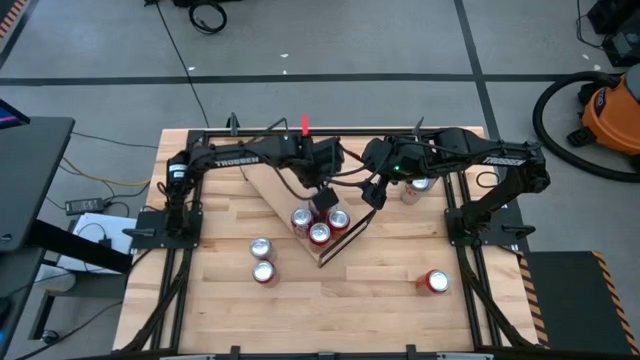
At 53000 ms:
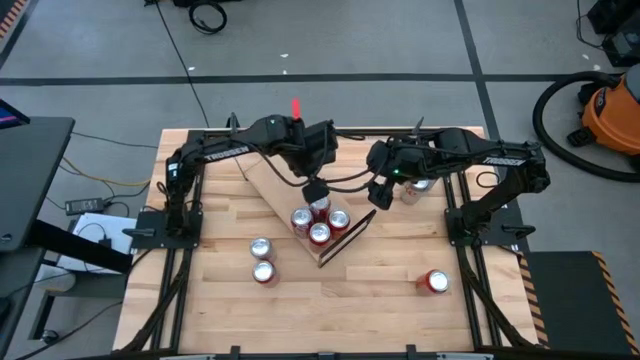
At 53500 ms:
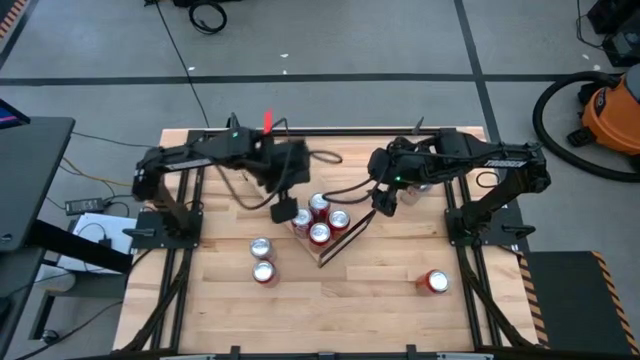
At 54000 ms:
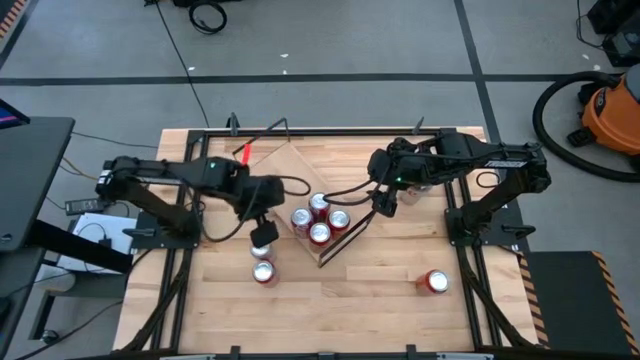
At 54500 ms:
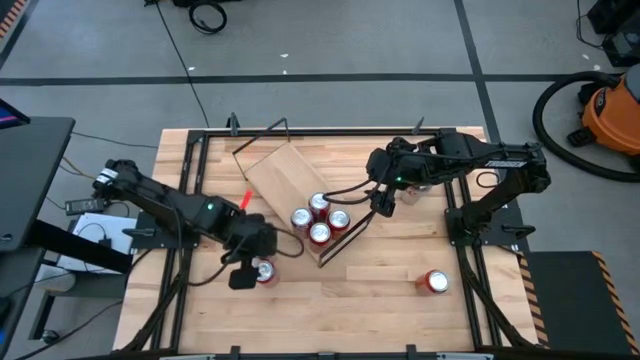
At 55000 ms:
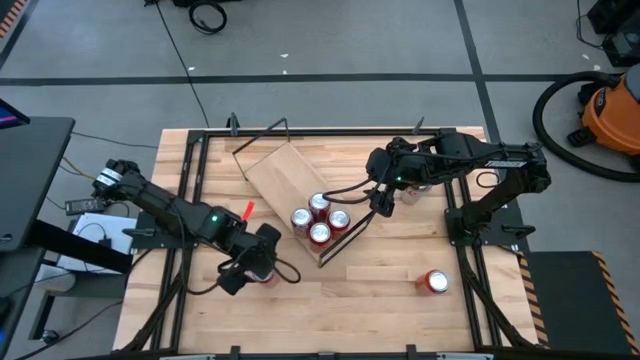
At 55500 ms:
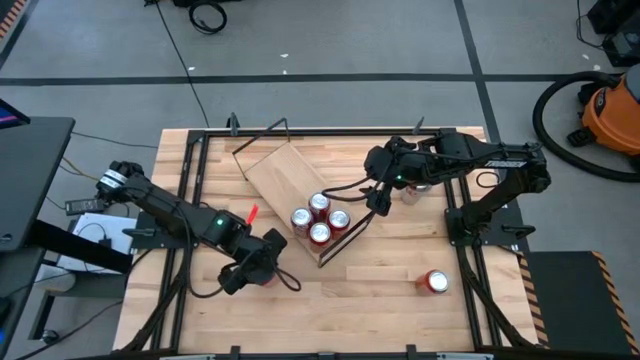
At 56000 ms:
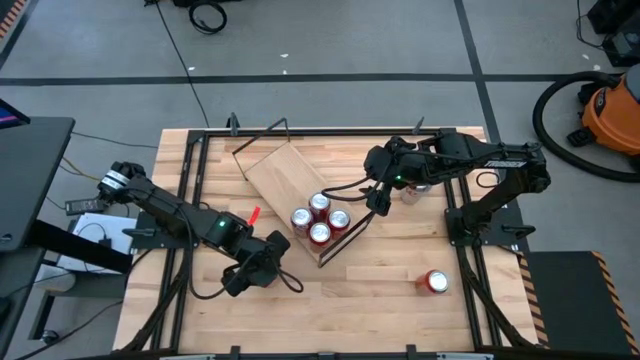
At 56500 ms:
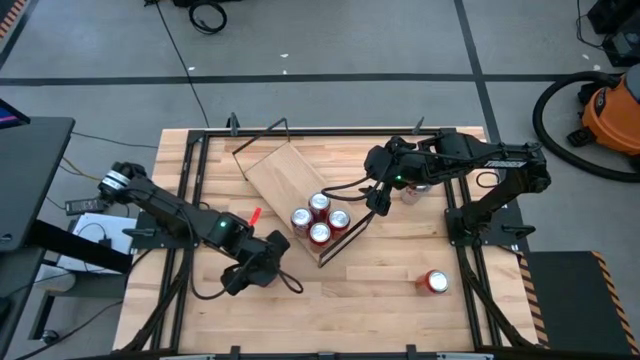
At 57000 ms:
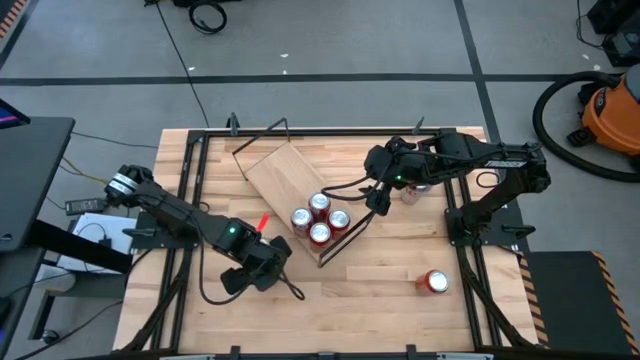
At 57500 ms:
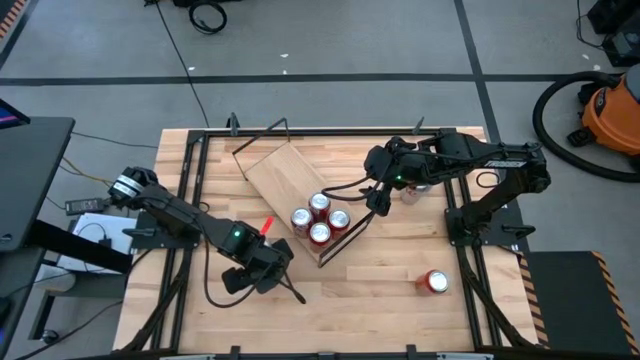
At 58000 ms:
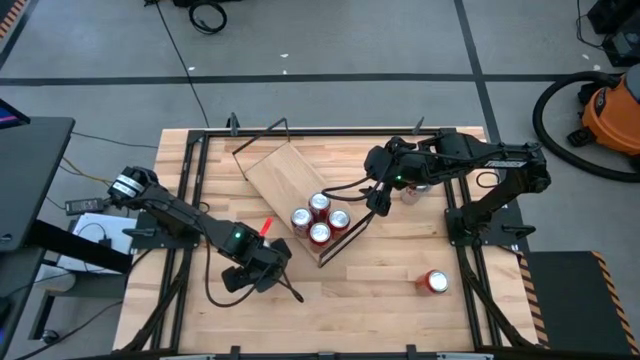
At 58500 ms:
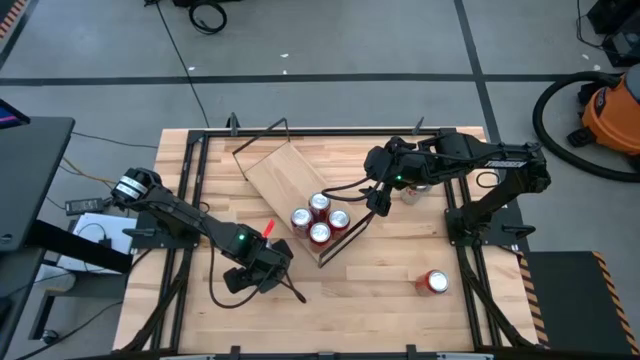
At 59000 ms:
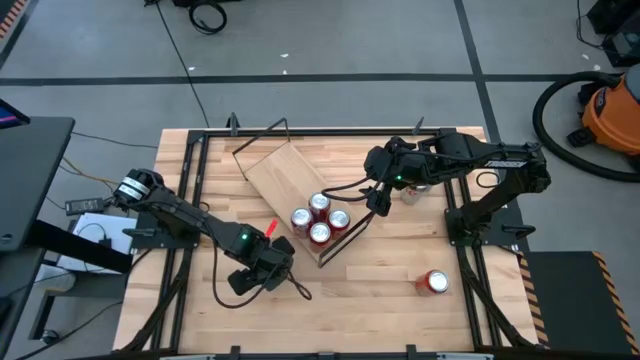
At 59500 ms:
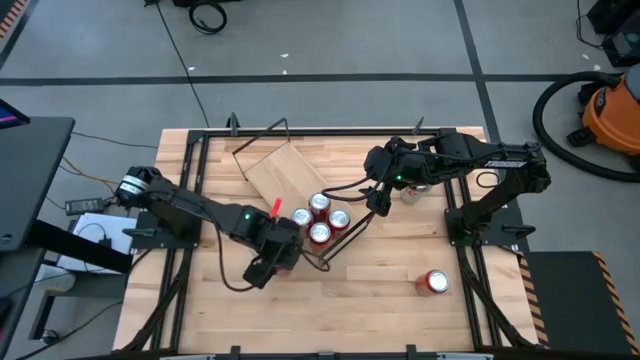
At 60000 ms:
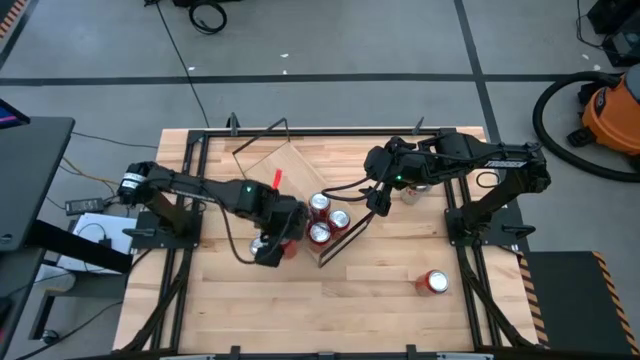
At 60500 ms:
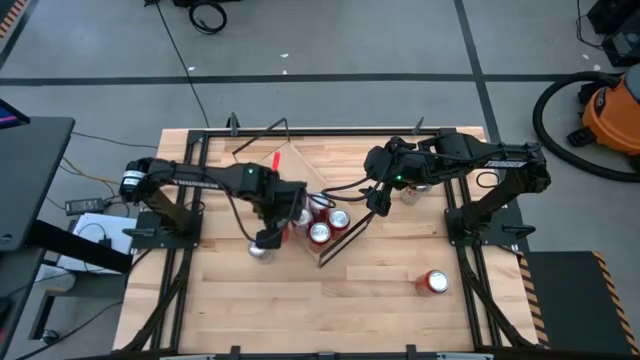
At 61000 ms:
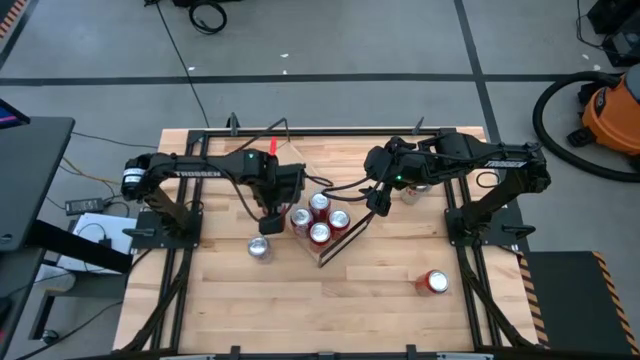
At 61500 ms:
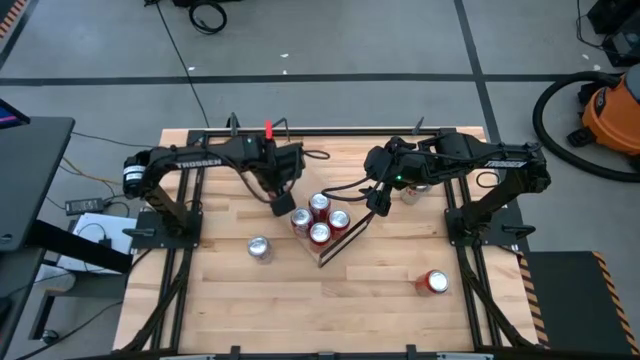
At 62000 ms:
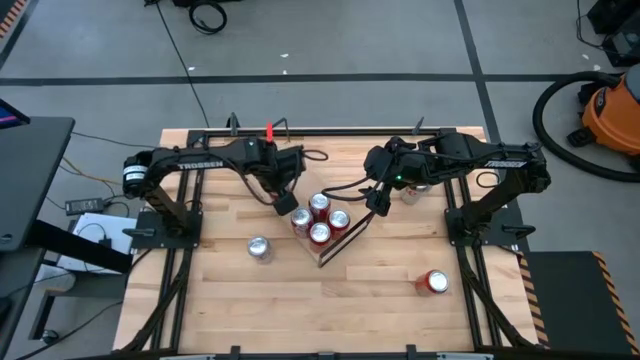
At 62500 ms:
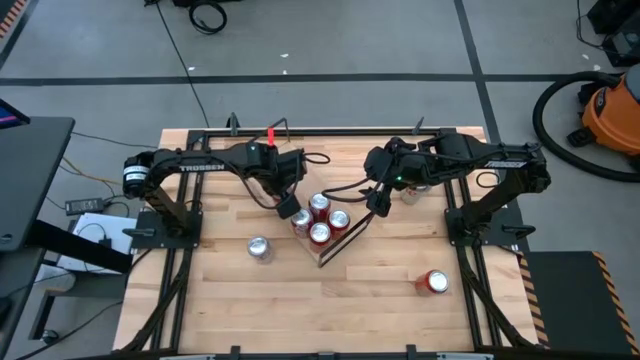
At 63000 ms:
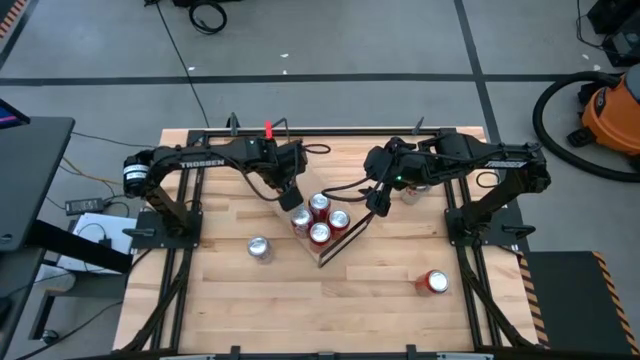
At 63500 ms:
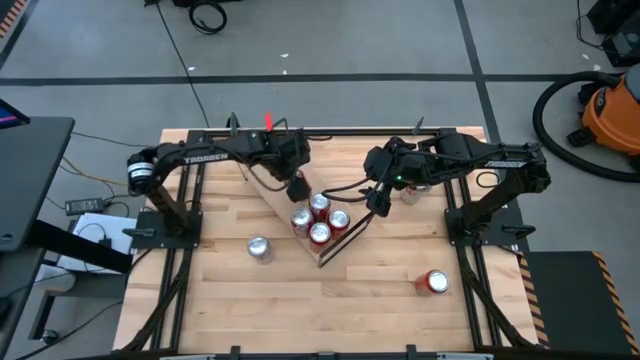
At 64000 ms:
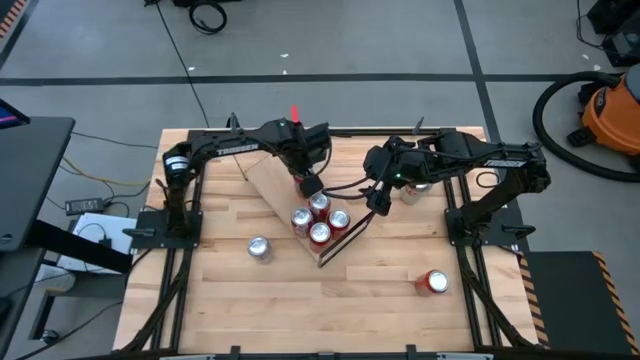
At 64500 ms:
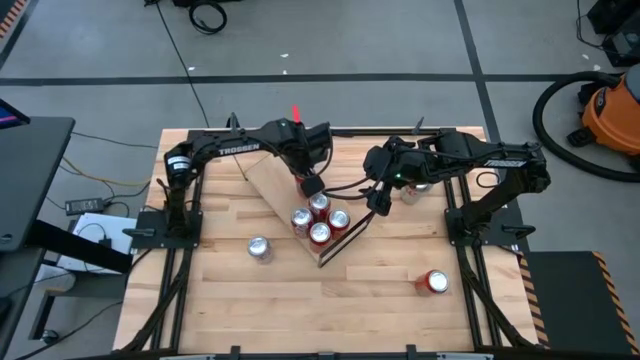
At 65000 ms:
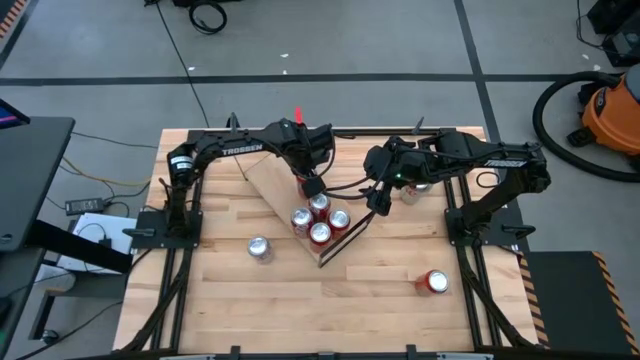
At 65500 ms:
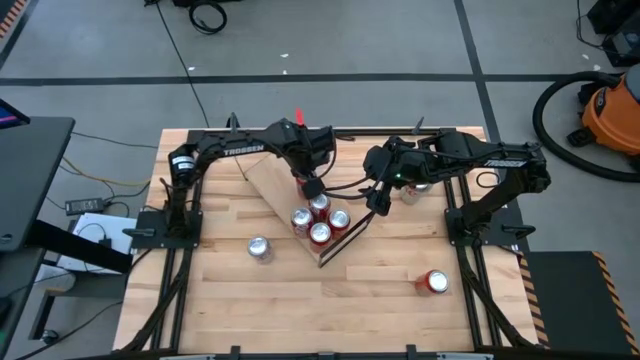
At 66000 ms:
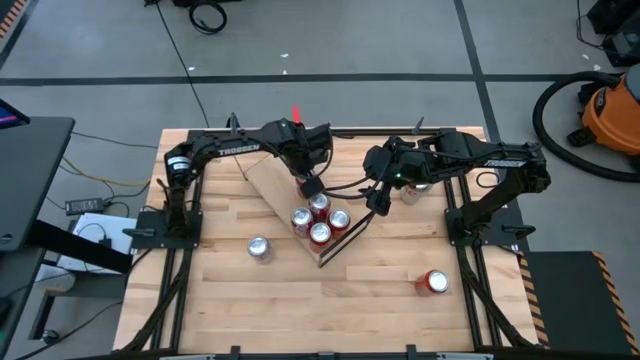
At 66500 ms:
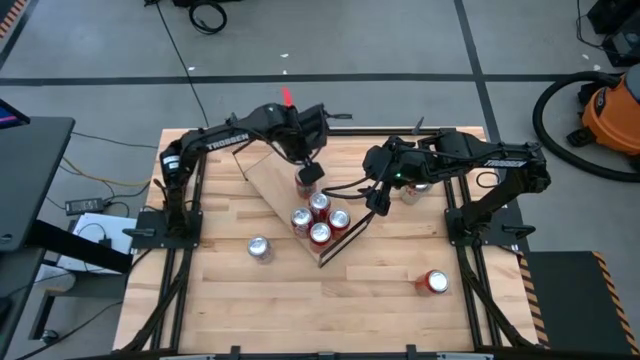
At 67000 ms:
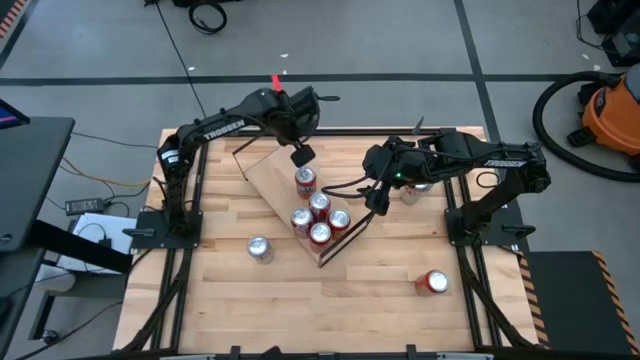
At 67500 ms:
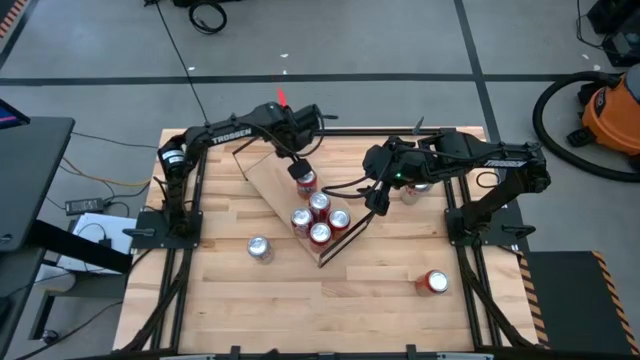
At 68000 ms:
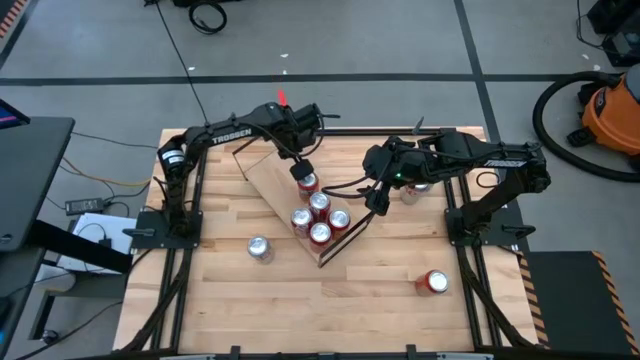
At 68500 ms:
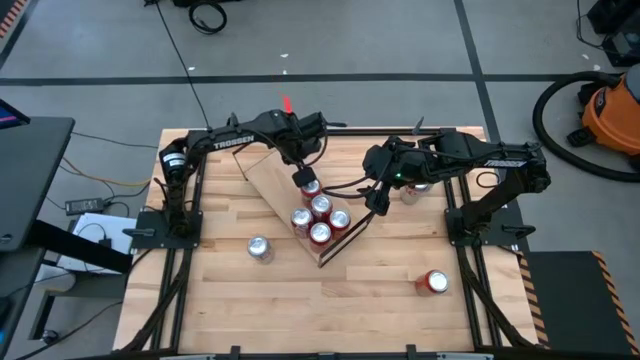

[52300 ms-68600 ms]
Task: Place canned beverage on shelf
Put the left orange soda can on the shelf

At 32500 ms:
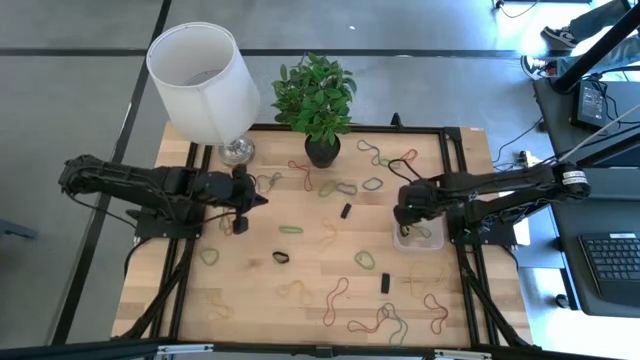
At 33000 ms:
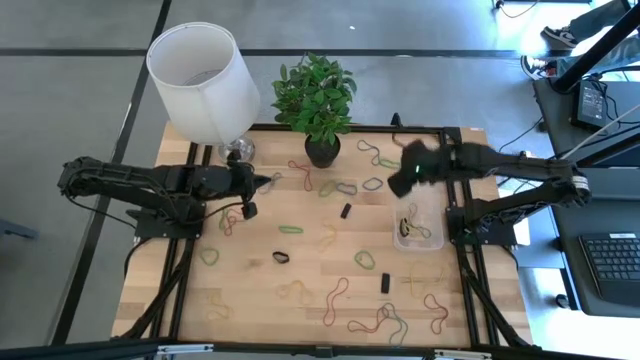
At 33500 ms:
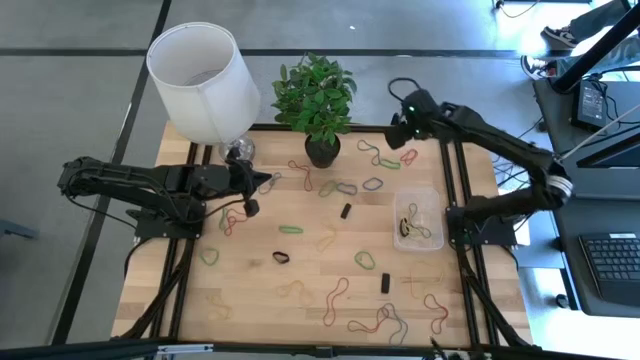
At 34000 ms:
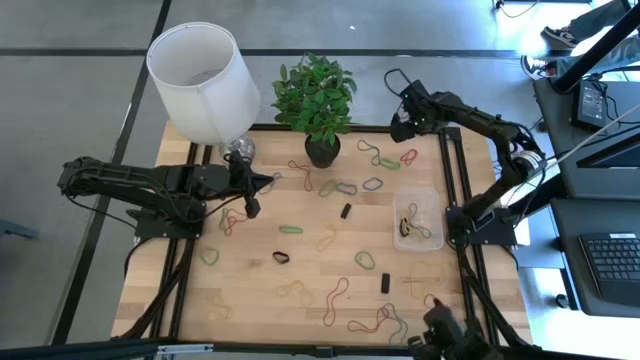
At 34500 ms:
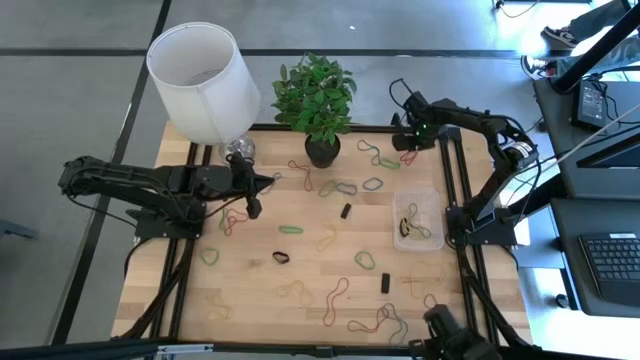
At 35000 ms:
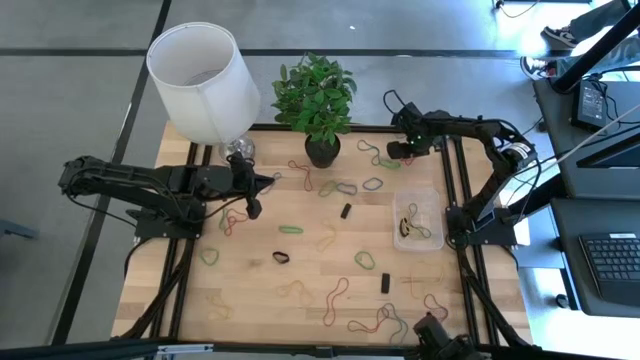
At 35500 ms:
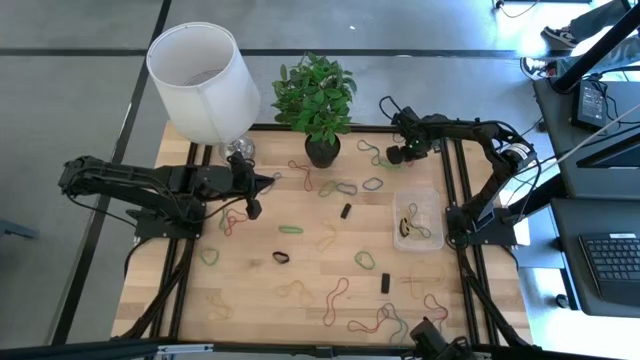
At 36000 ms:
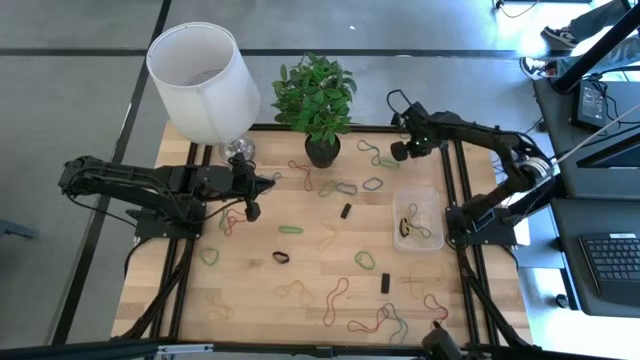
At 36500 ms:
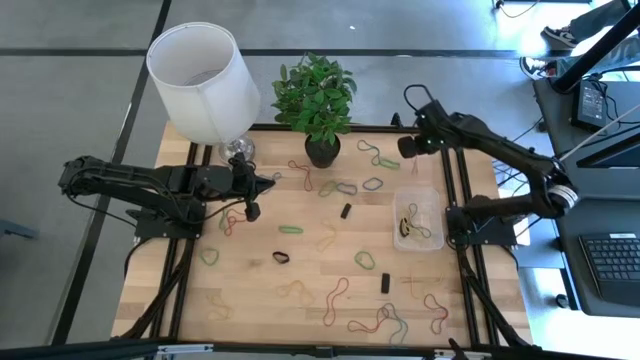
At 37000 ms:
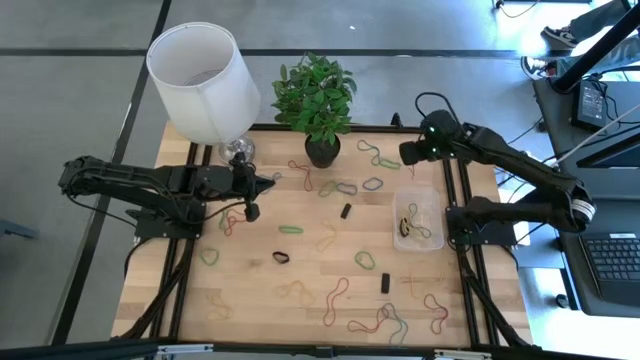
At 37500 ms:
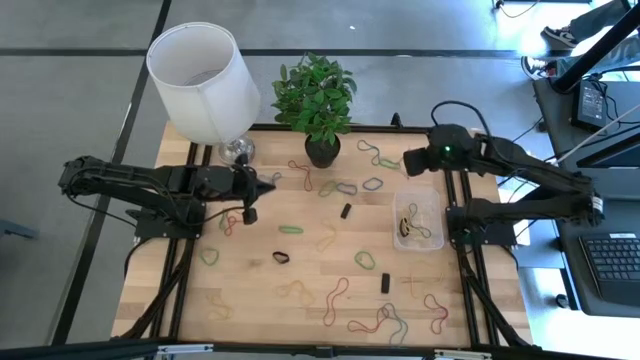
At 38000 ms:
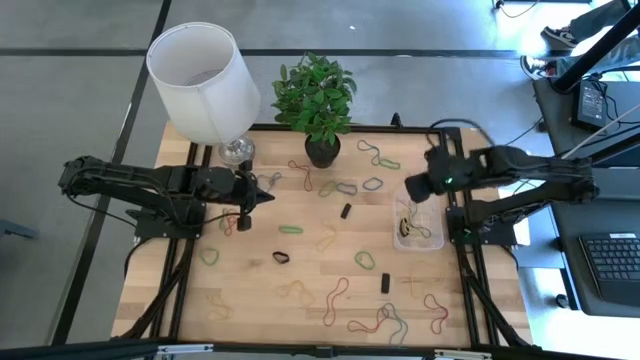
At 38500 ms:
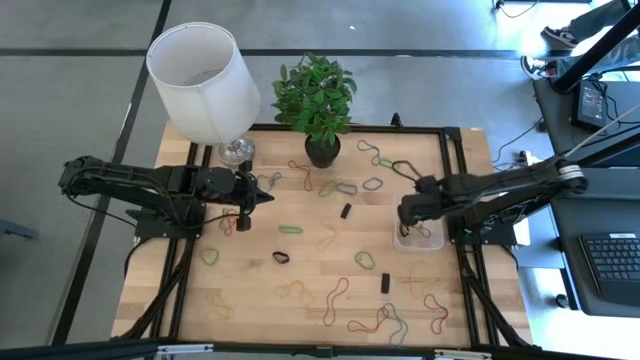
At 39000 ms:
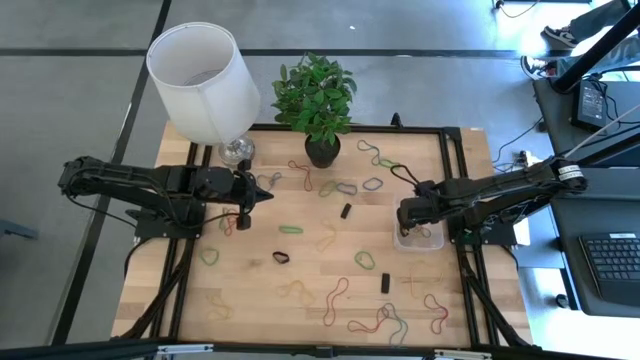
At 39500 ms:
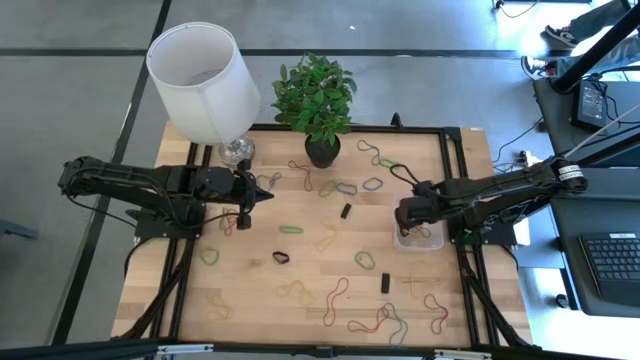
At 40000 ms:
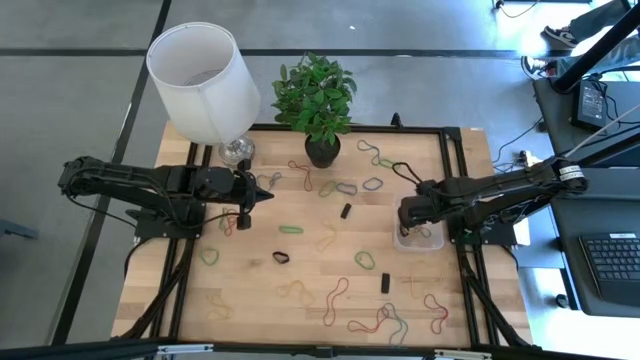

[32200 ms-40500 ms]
Task: Pick and place rubber bands into bin
Put the red rubber band into the transparent bin
